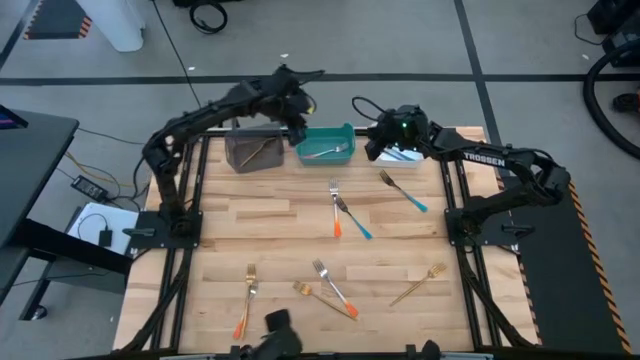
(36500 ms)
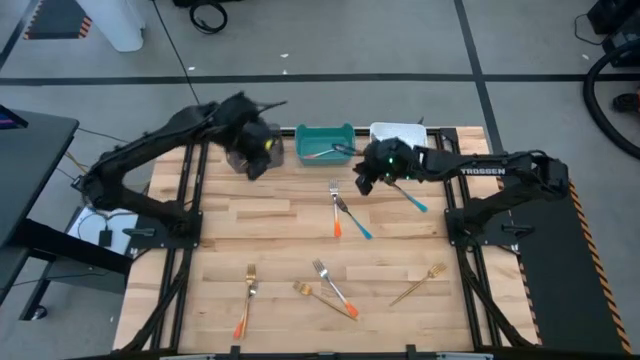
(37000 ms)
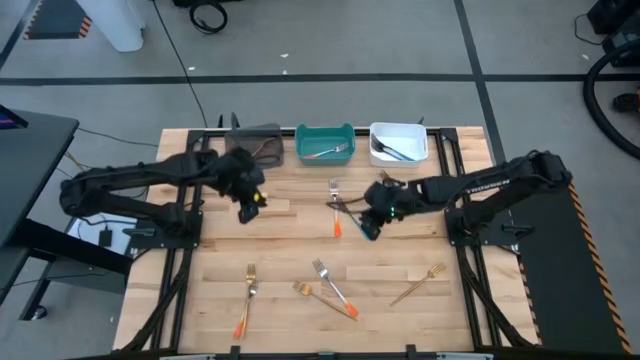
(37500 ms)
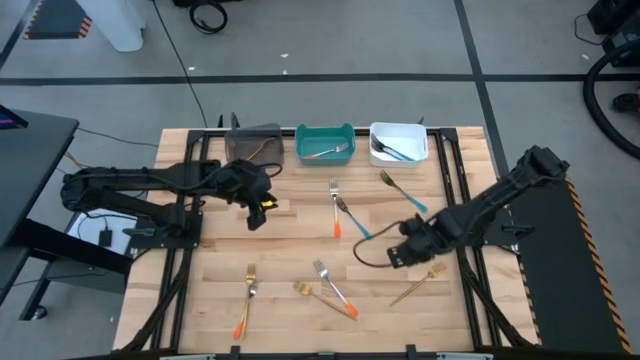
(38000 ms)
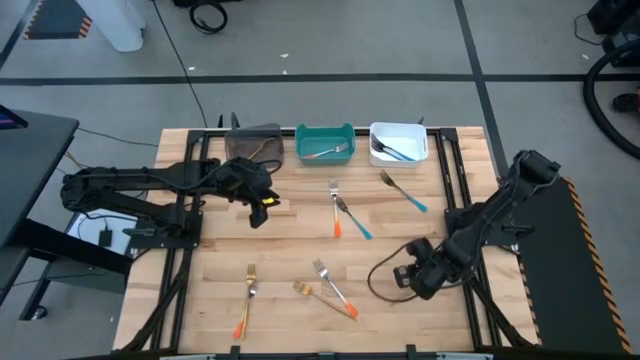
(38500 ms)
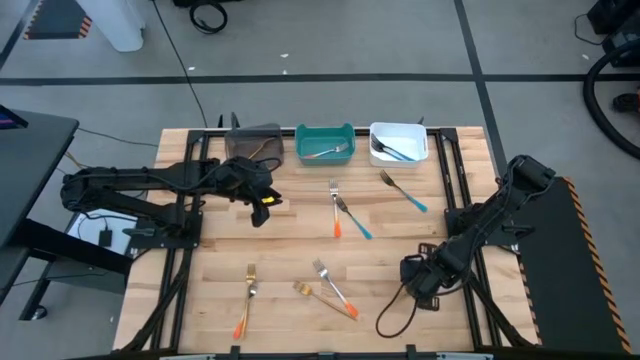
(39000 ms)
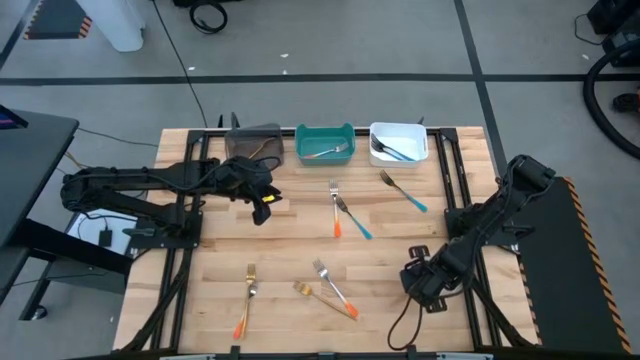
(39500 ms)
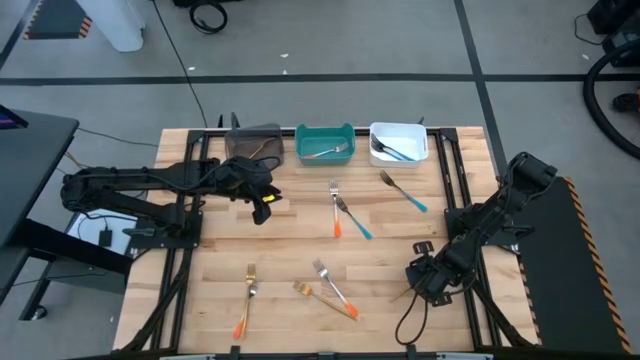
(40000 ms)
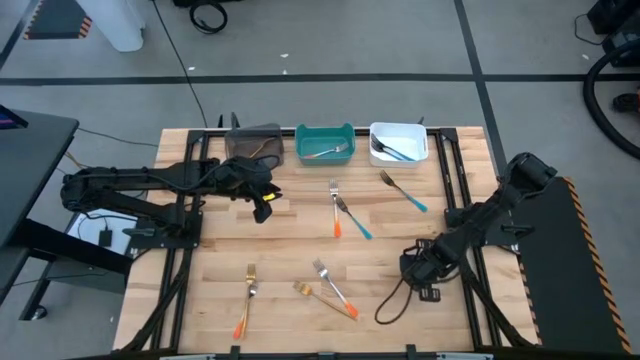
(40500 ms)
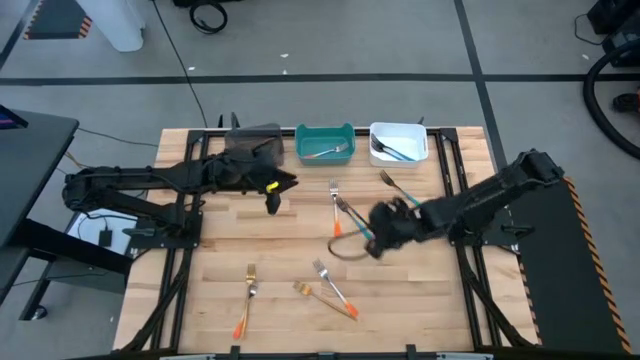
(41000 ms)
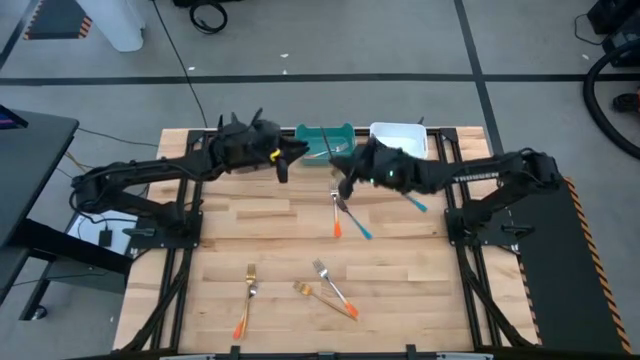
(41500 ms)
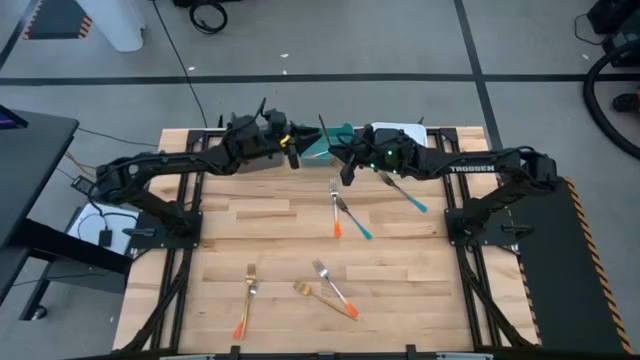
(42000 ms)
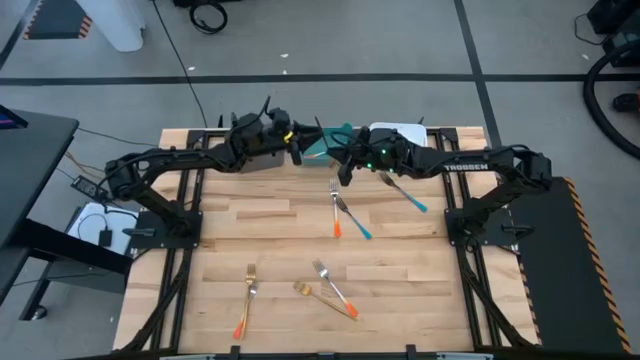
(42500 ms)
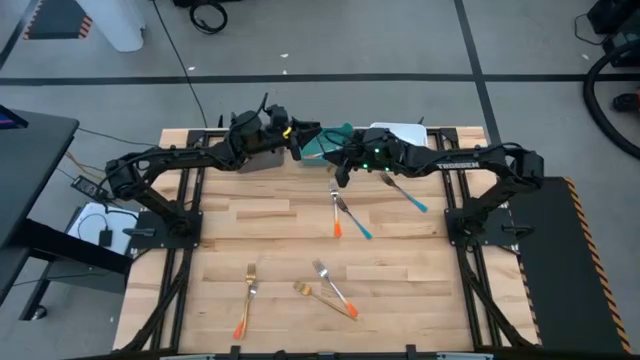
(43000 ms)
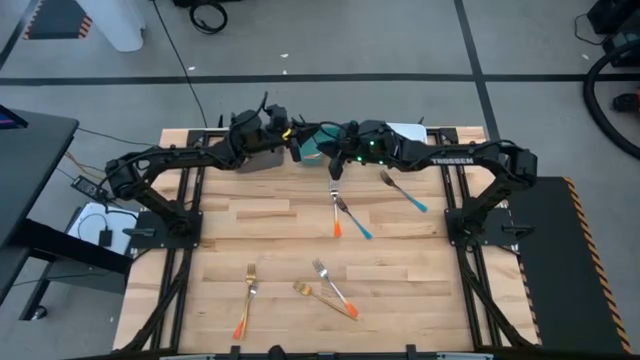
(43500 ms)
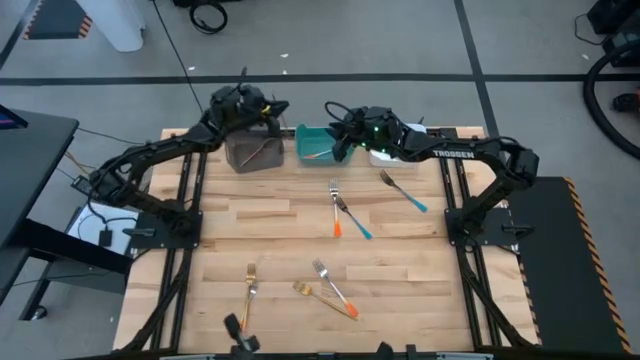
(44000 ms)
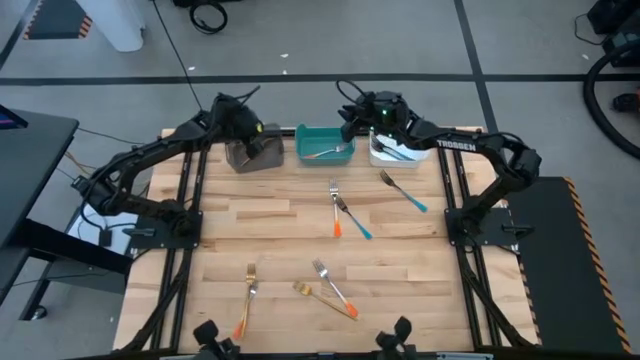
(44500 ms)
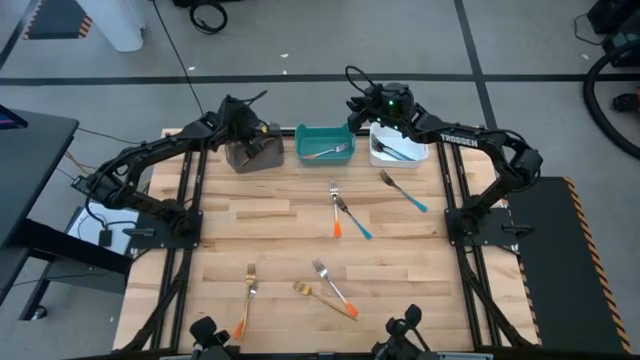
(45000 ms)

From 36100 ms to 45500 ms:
Task: Sort silverware by color (type)
Put the gold fork into the black bin

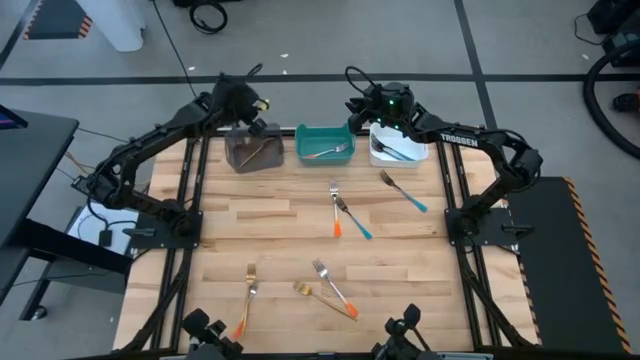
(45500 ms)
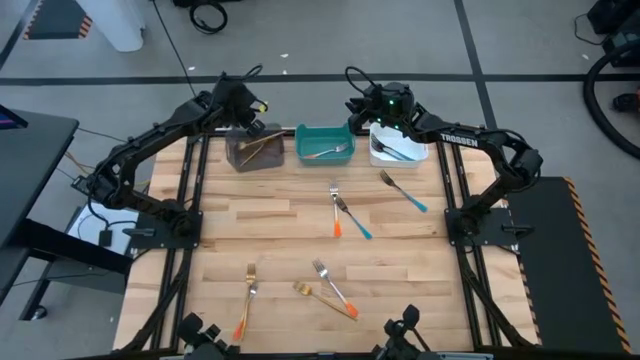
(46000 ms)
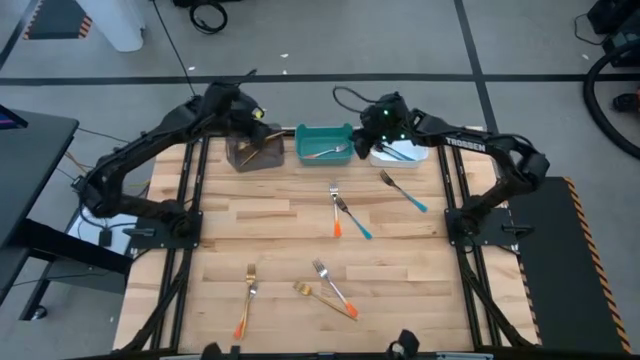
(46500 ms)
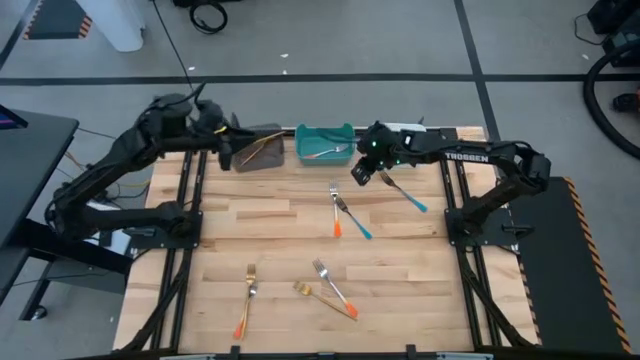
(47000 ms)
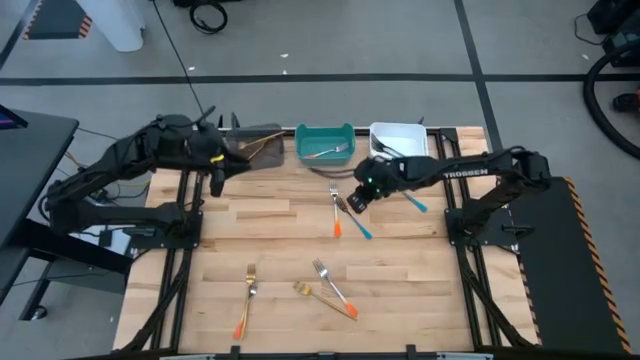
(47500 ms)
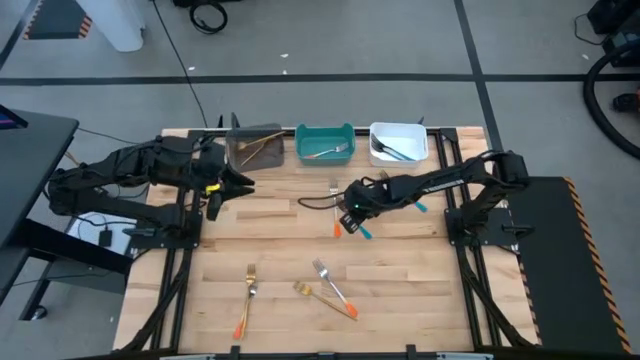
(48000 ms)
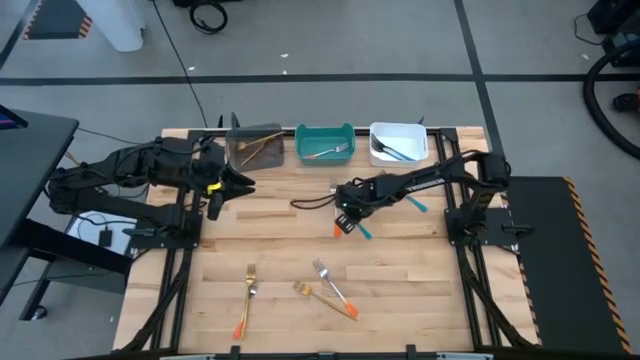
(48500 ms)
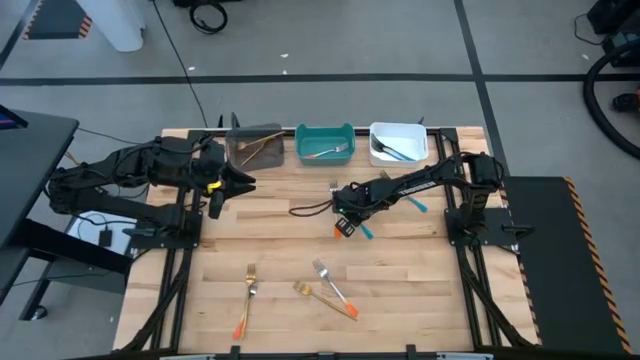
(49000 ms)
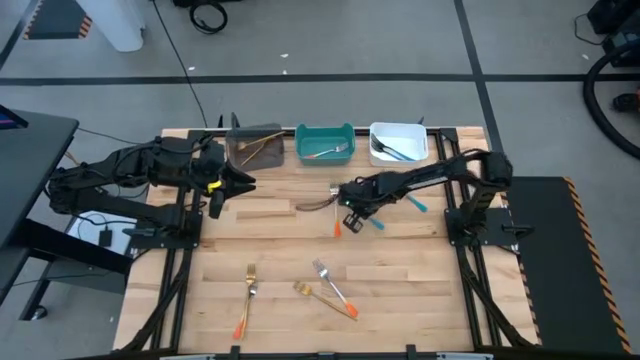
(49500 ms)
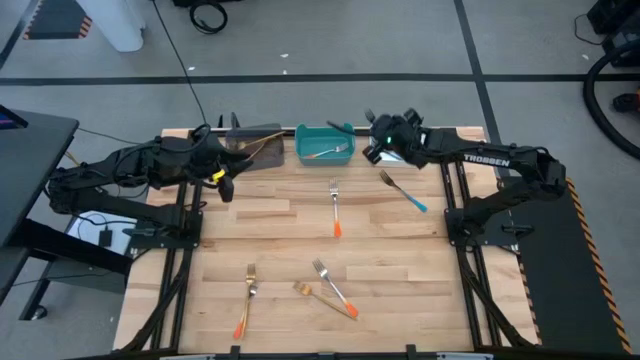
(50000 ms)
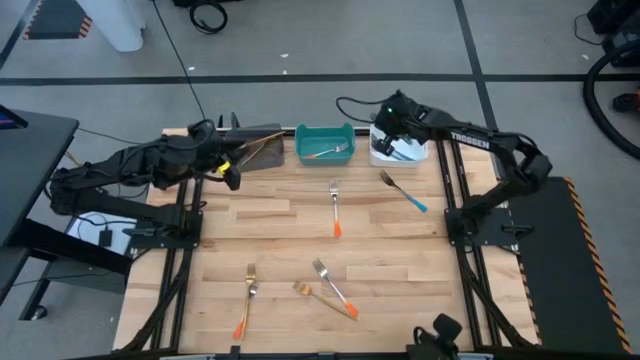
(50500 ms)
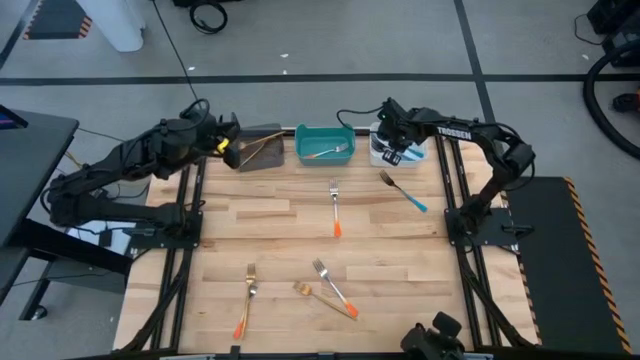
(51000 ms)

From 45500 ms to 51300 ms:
Put the blue fork into the white bin

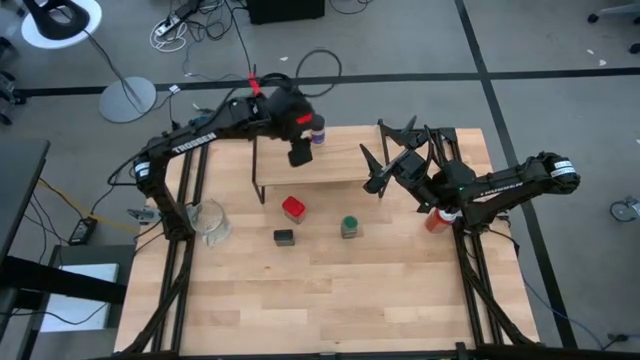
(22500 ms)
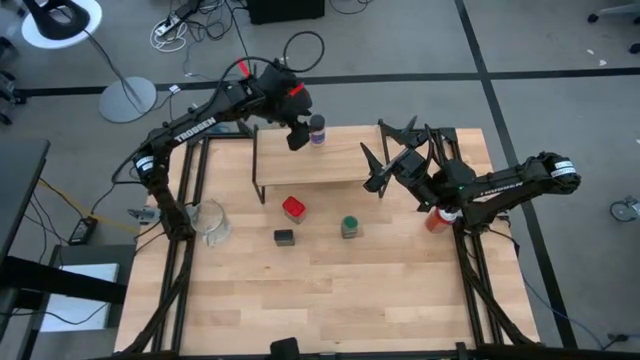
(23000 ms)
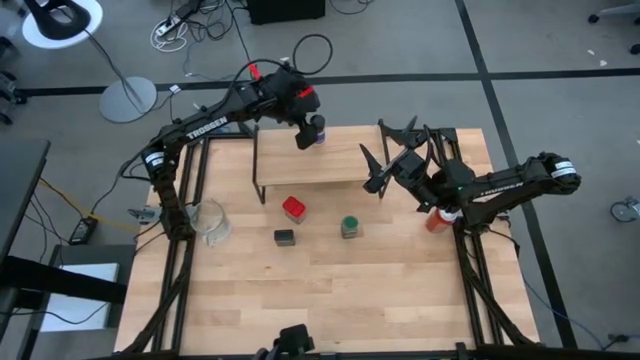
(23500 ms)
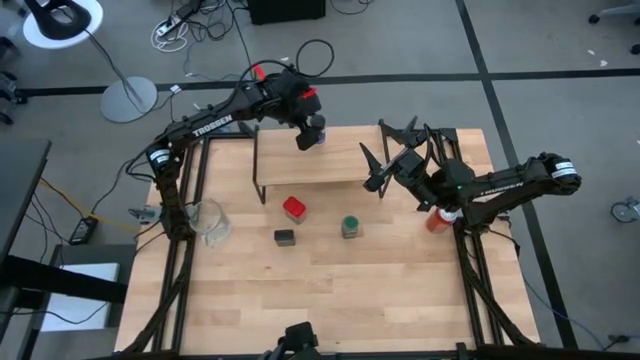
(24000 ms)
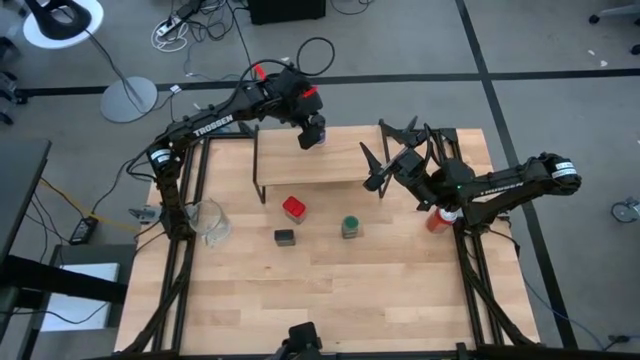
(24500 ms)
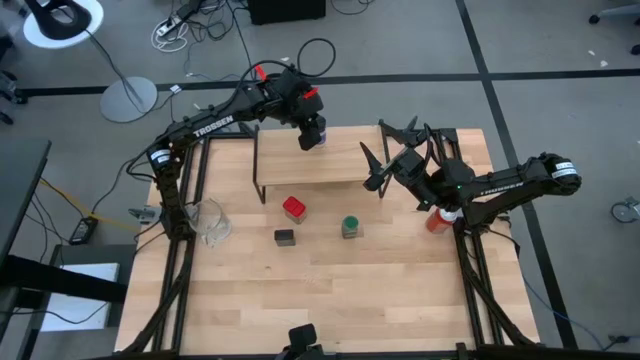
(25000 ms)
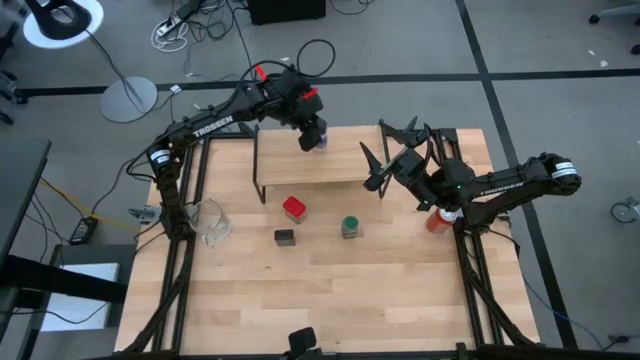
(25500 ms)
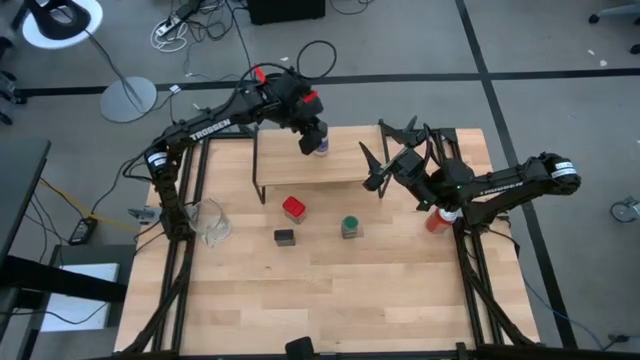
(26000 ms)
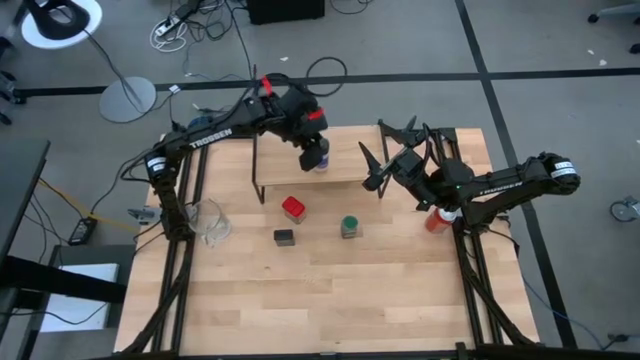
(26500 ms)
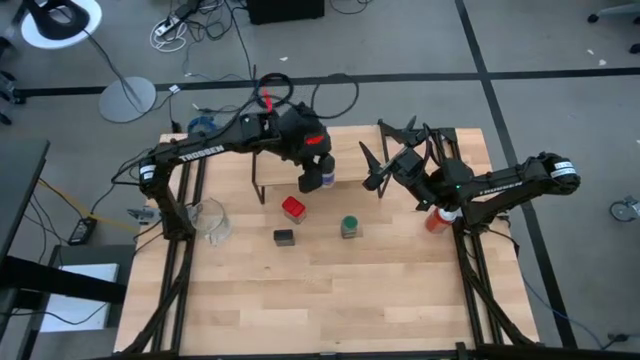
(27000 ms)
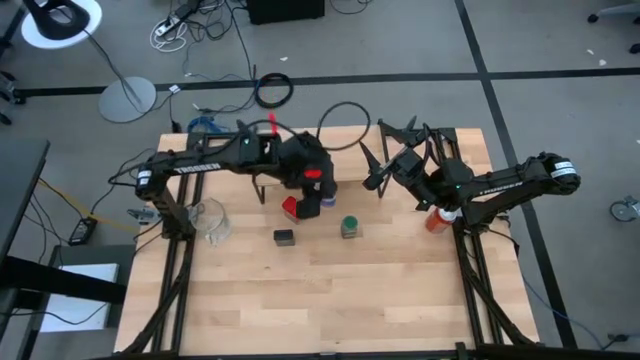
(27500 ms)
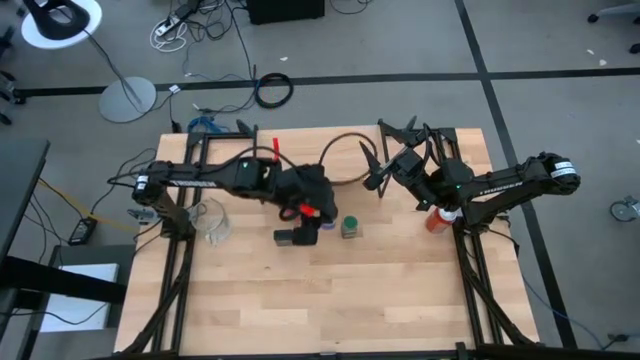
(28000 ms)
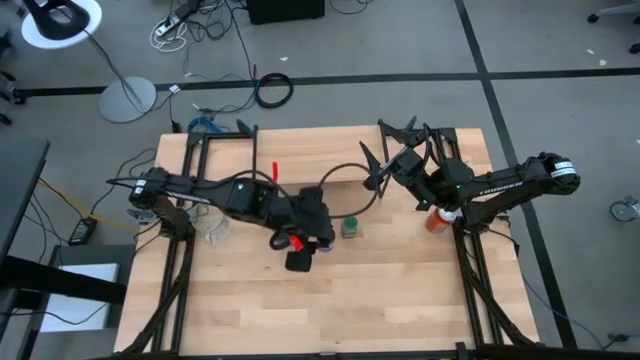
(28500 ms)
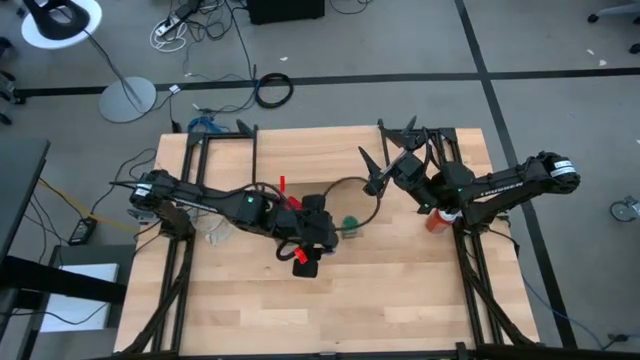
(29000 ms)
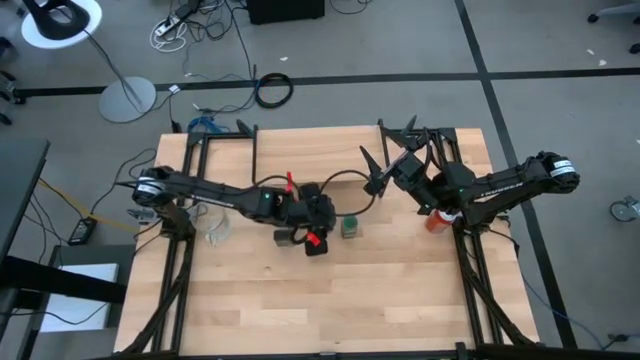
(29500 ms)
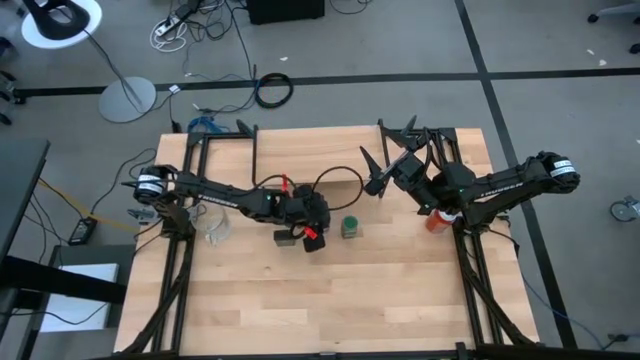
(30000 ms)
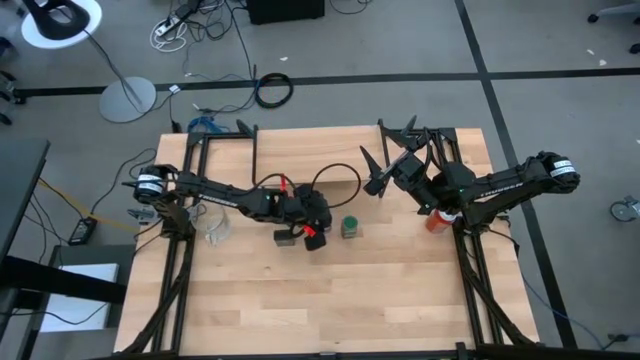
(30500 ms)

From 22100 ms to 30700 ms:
Task: Shelf spices
Remove the black seasoning bottle from the shelf
